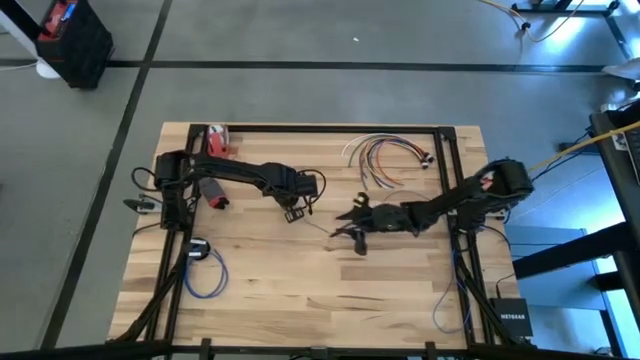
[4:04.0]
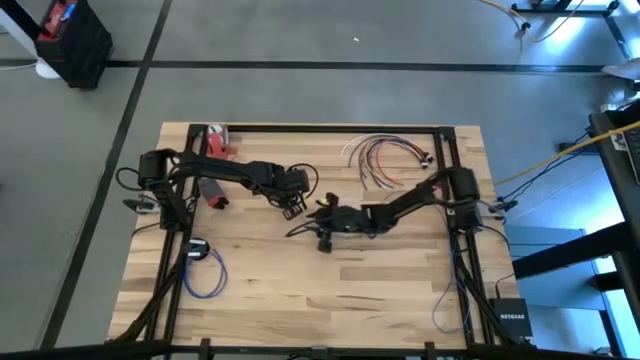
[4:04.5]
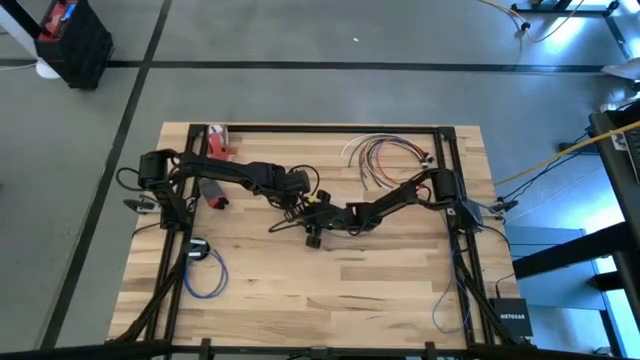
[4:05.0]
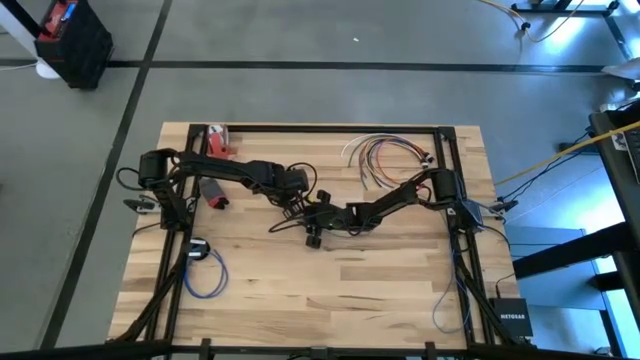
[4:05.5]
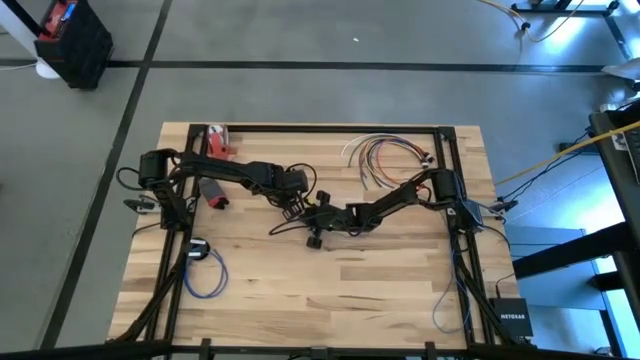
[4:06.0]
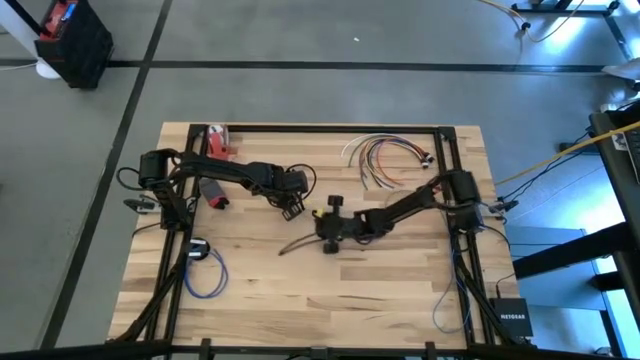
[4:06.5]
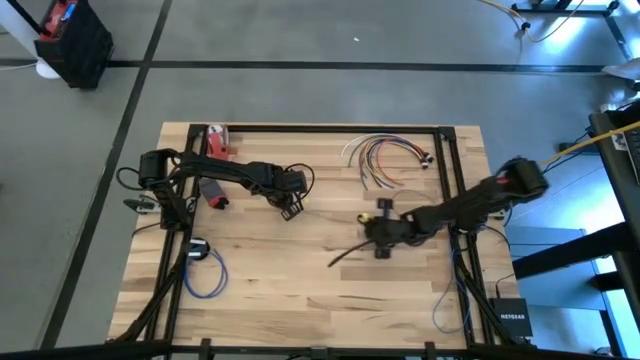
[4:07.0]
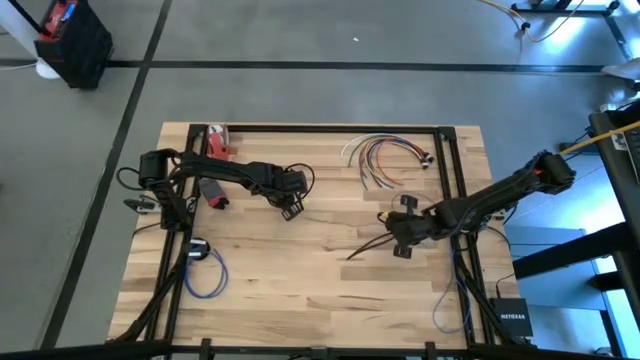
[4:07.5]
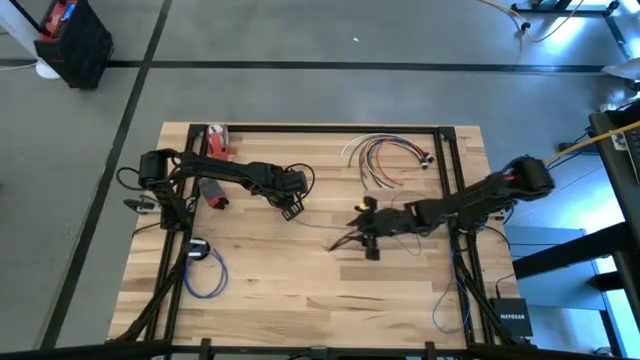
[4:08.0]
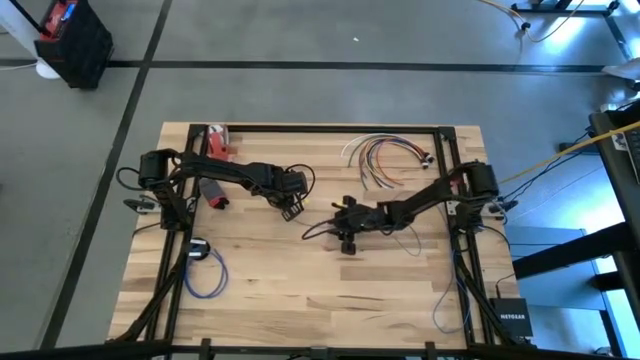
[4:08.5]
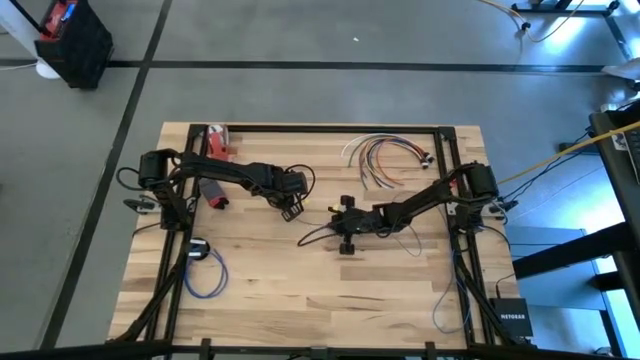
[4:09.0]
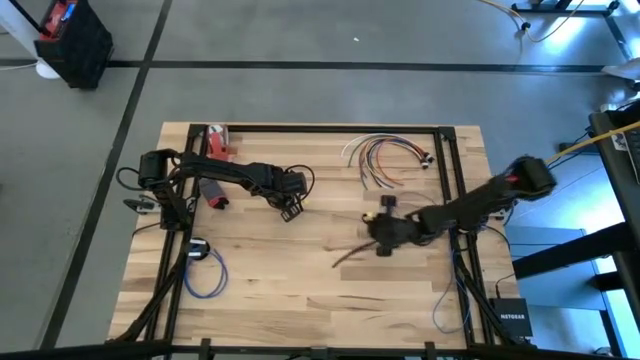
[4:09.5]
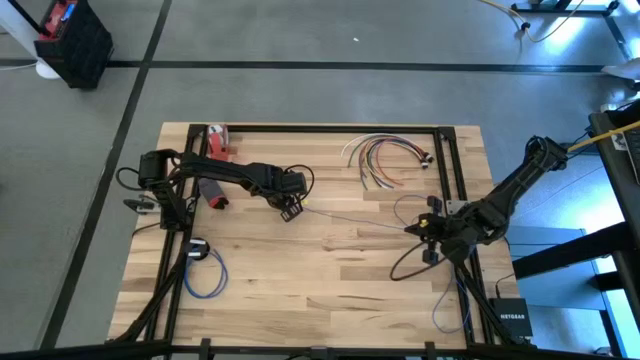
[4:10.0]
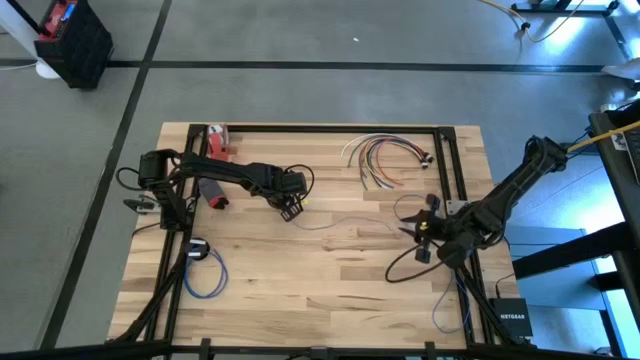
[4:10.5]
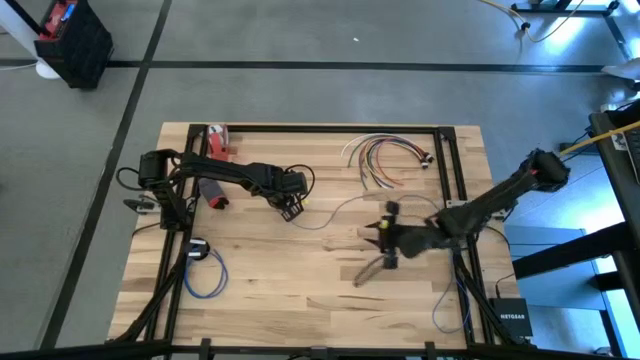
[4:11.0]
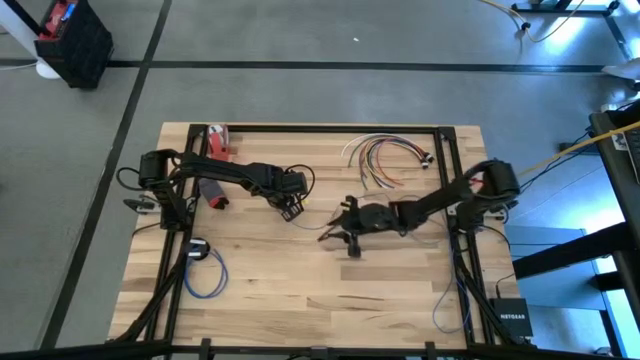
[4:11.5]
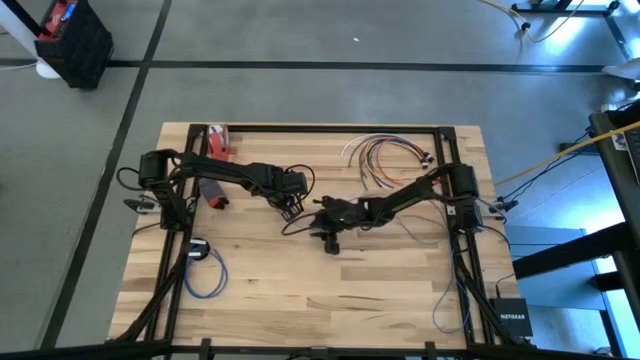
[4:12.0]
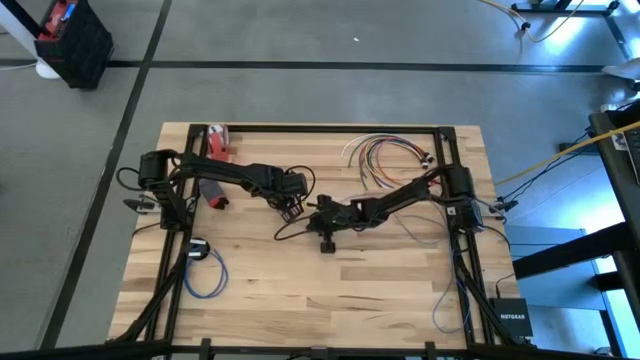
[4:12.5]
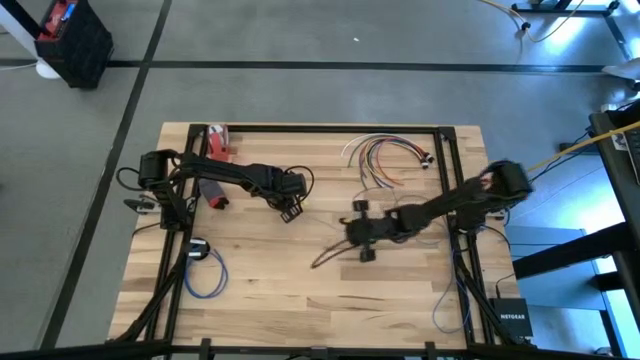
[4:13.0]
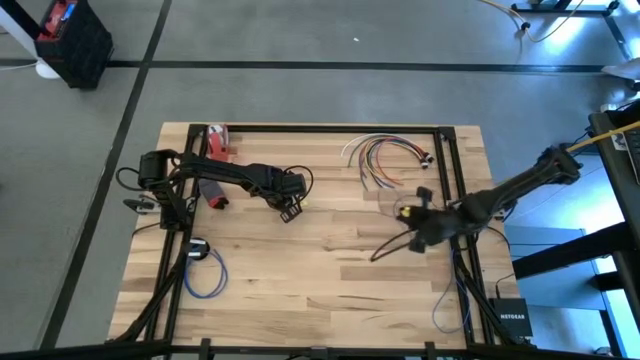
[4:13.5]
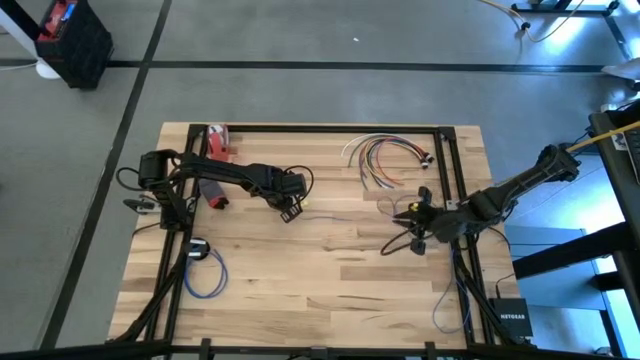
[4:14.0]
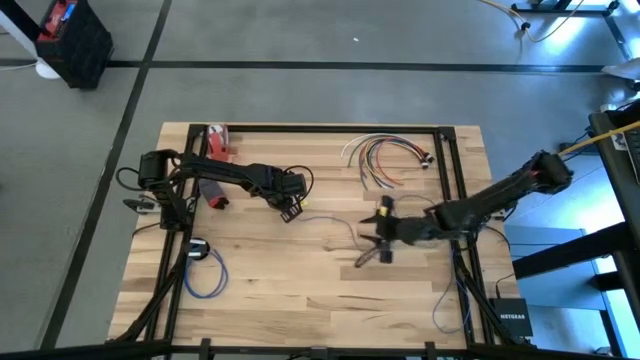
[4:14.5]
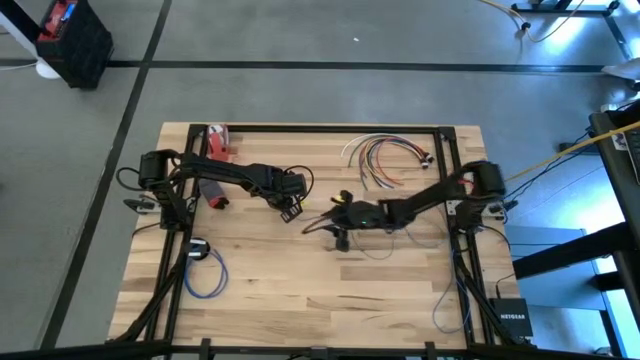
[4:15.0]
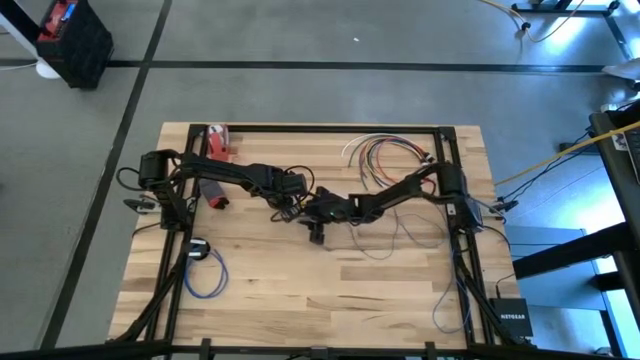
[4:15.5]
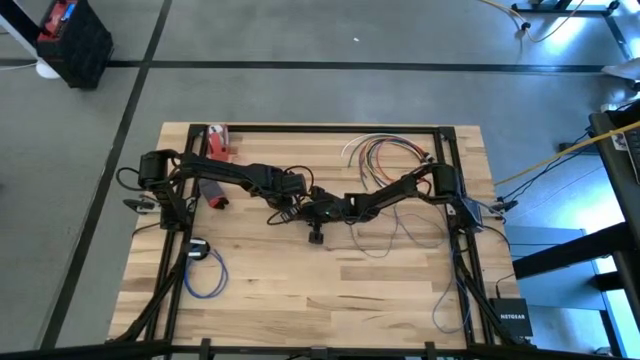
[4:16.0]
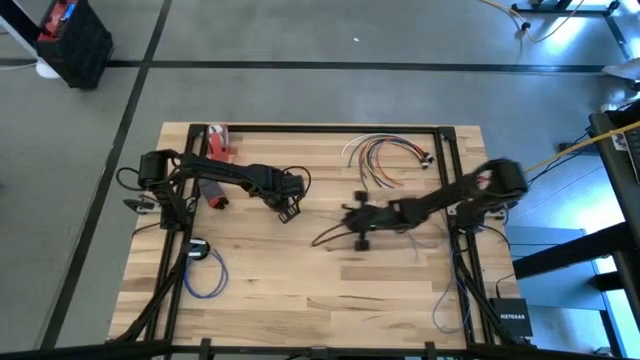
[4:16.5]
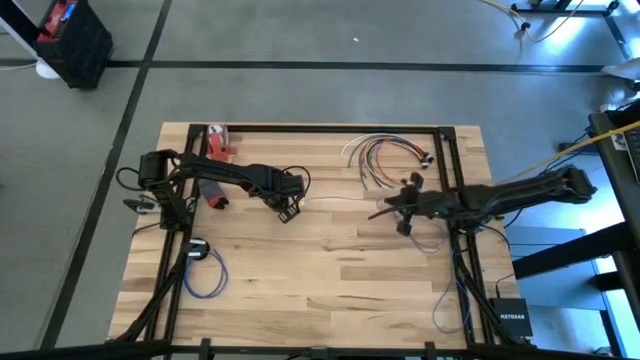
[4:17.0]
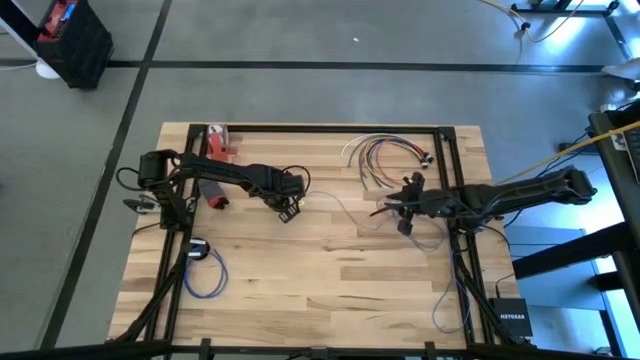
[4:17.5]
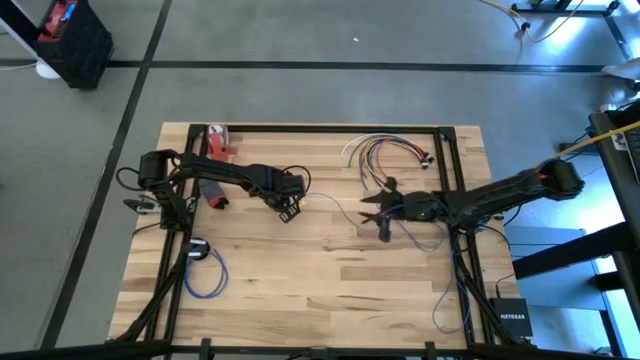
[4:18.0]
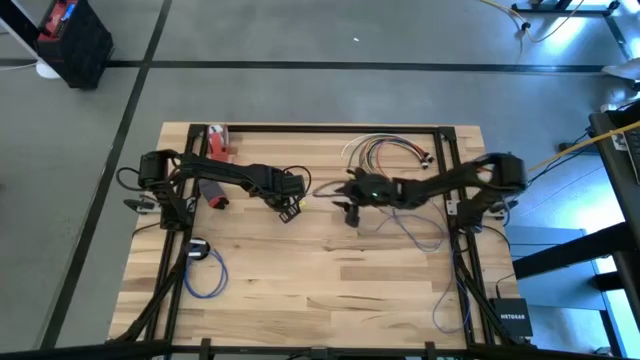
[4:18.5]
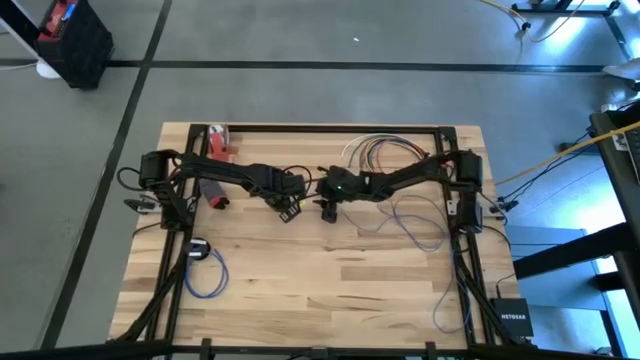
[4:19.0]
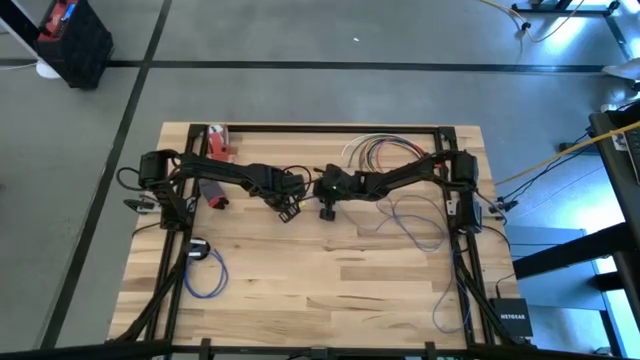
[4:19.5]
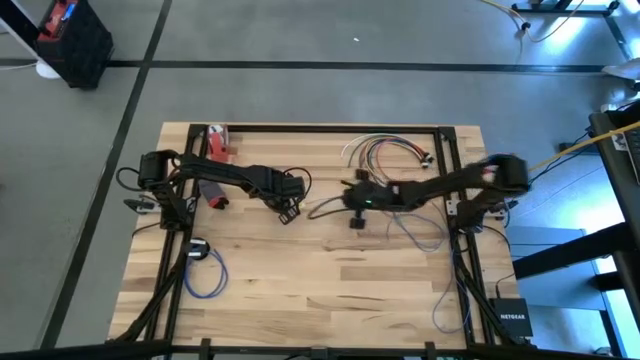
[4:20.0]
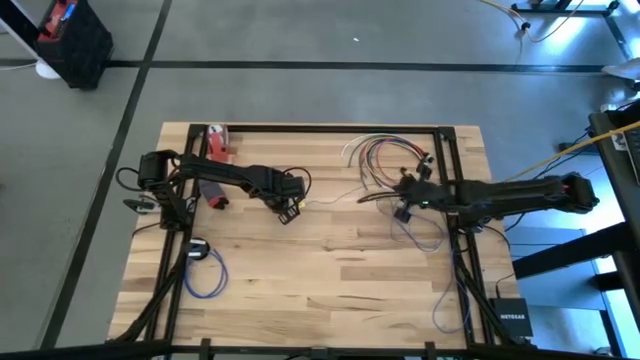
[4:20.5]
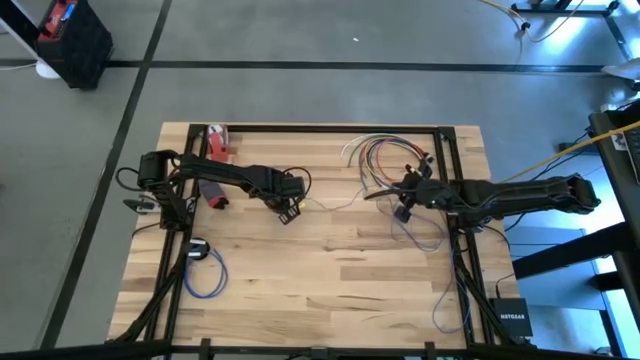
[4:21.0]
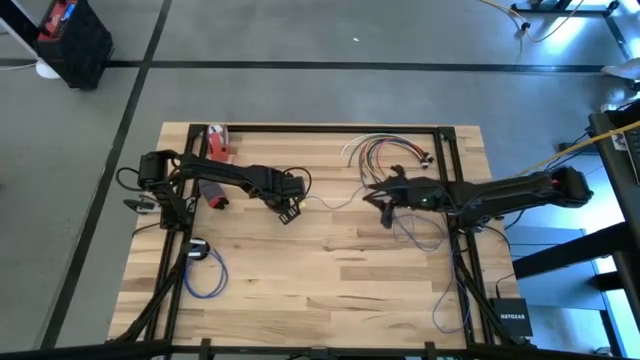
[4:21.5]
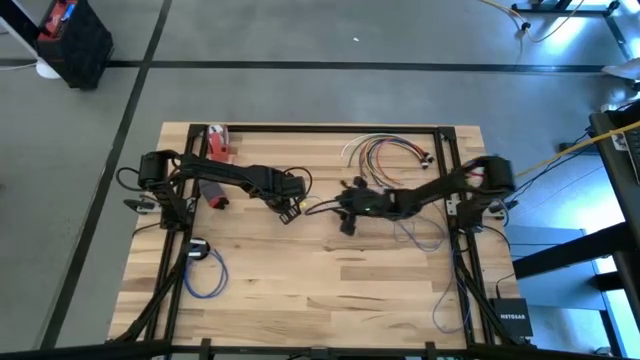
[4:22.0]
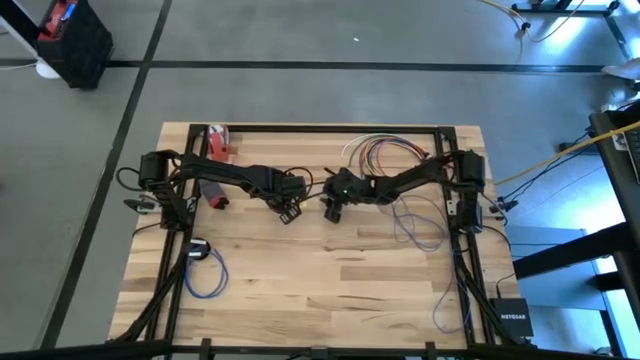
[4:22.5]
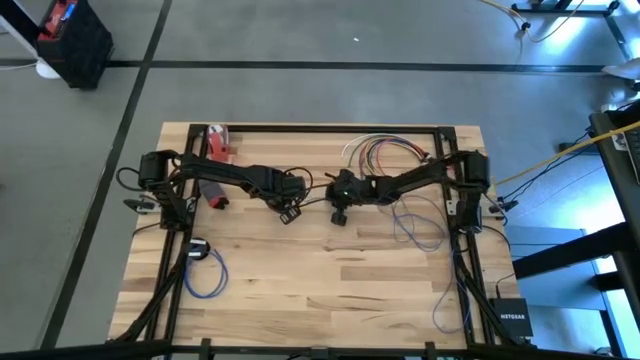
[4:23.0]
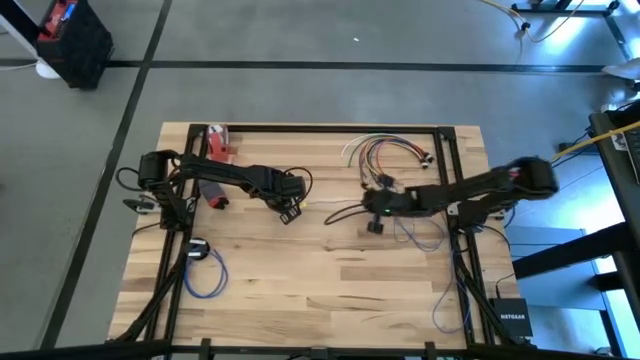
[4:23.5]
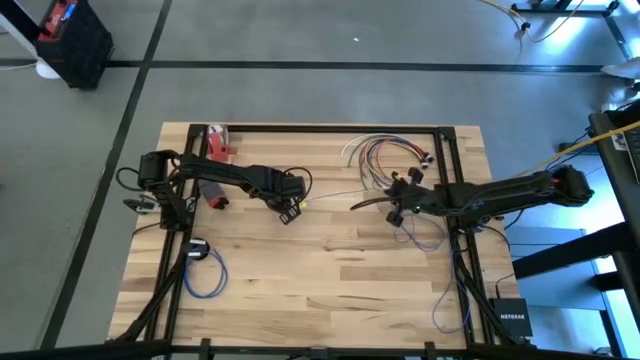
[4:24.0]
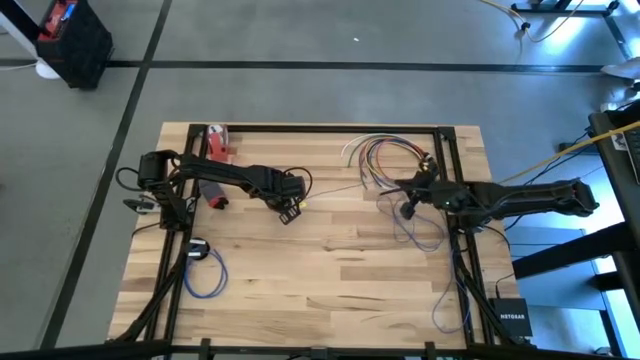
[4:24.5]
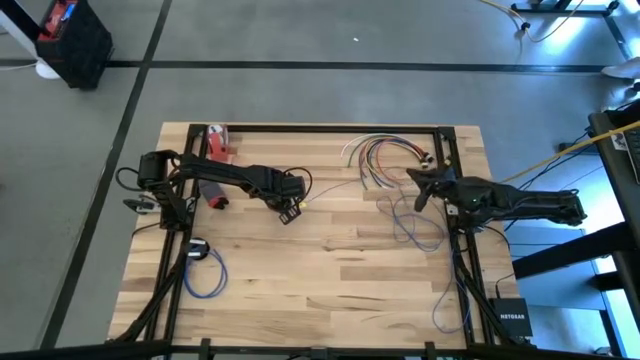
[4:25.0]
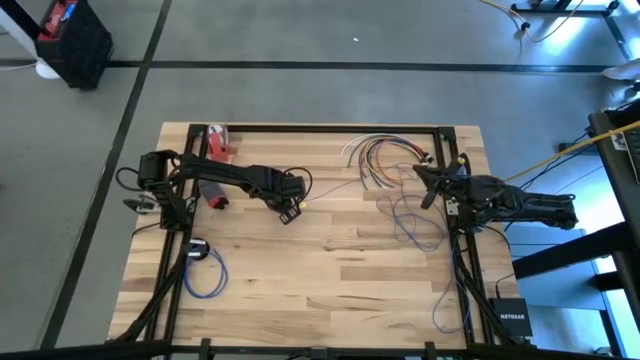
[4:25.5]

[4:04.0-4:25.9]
Task: Coil cords
Uncoil the blue cable wire from the spool
